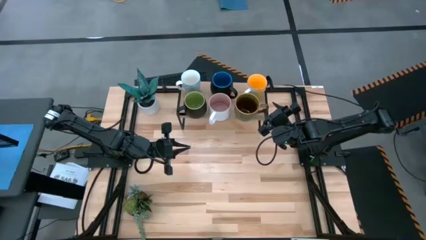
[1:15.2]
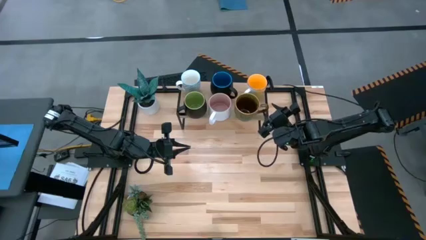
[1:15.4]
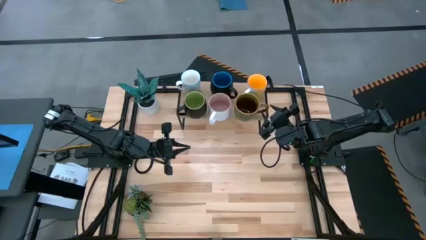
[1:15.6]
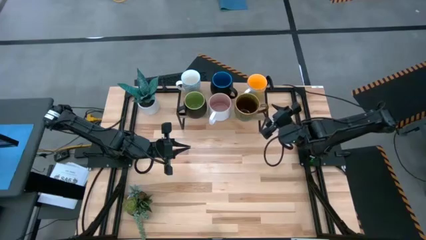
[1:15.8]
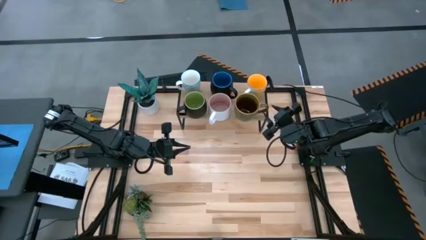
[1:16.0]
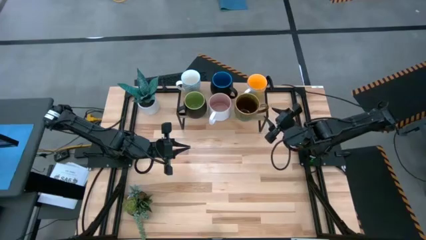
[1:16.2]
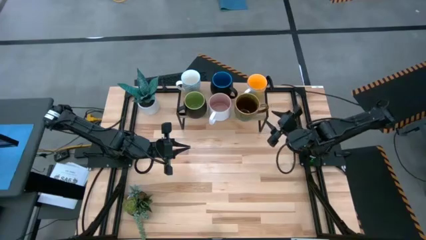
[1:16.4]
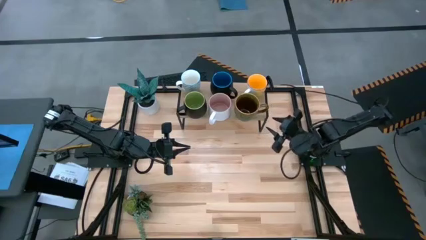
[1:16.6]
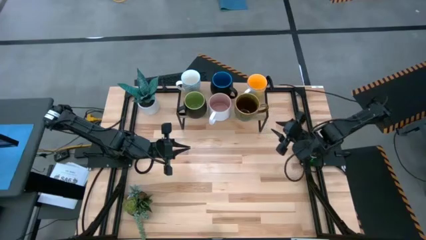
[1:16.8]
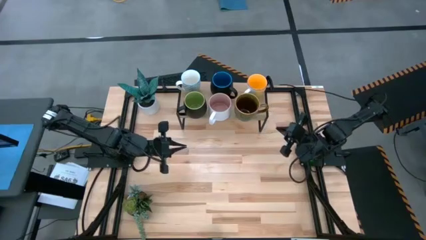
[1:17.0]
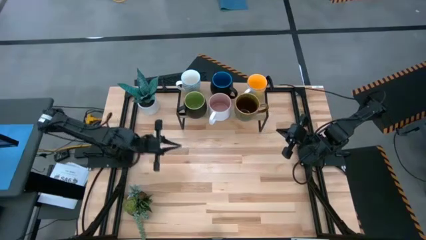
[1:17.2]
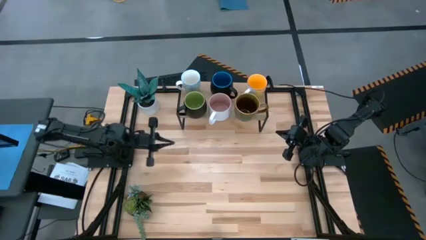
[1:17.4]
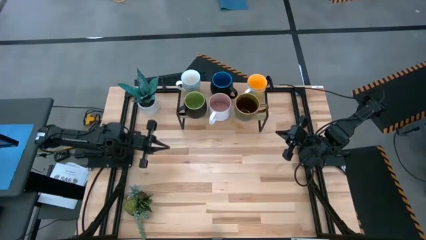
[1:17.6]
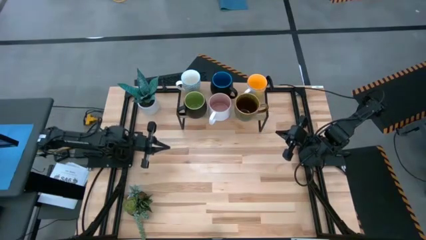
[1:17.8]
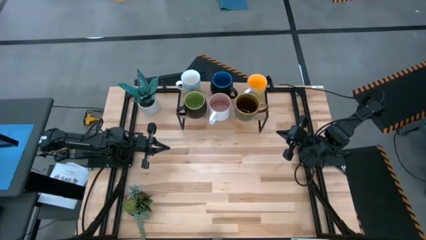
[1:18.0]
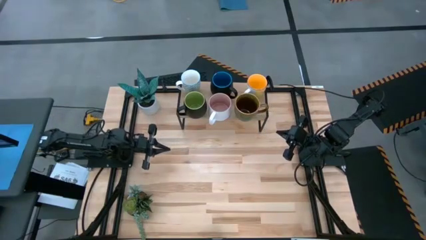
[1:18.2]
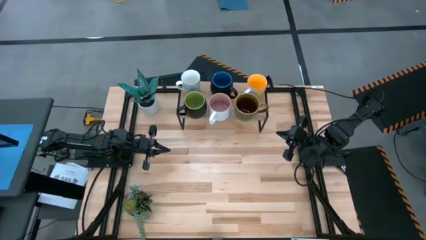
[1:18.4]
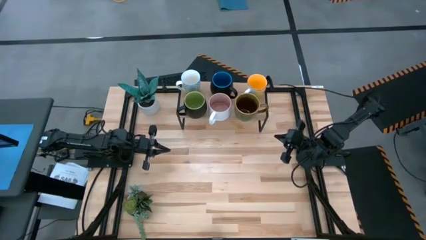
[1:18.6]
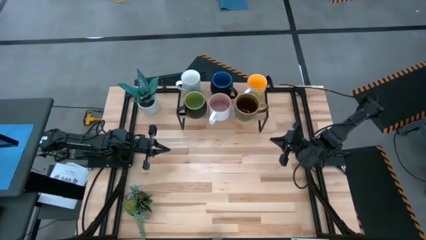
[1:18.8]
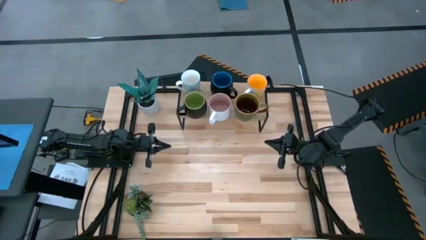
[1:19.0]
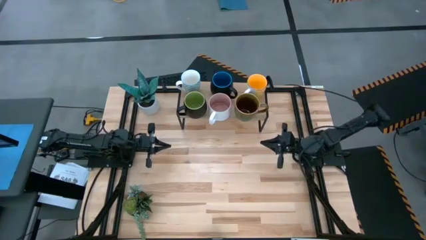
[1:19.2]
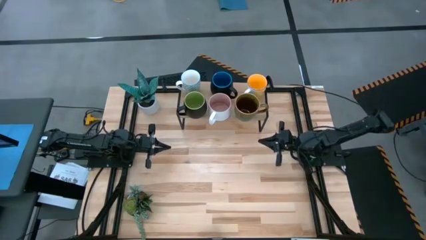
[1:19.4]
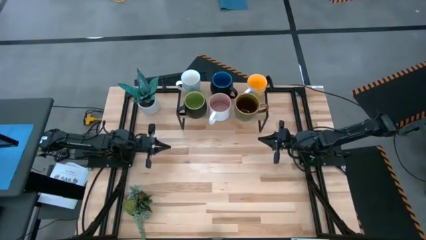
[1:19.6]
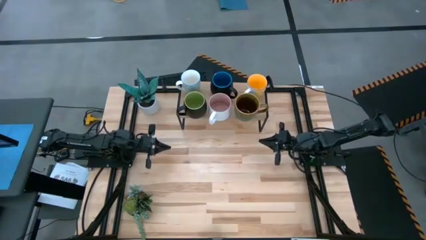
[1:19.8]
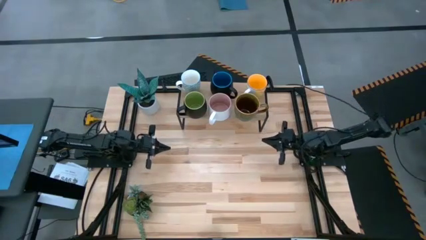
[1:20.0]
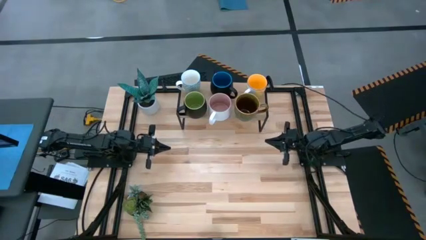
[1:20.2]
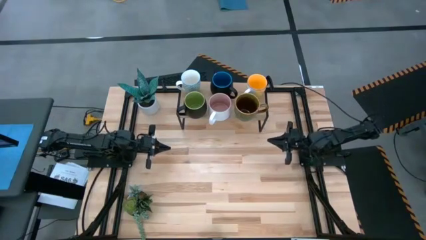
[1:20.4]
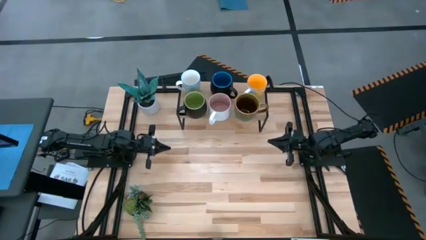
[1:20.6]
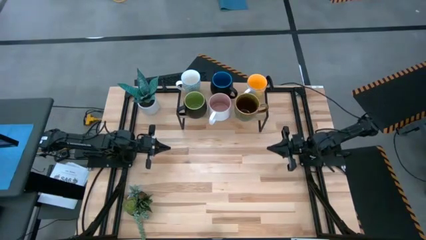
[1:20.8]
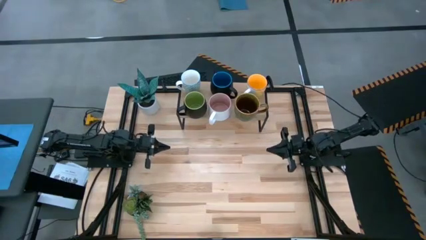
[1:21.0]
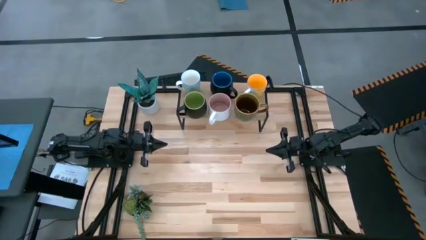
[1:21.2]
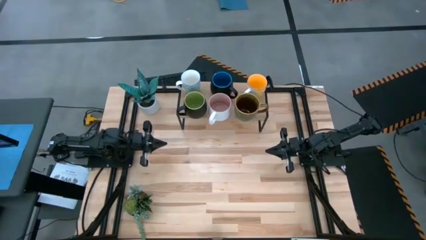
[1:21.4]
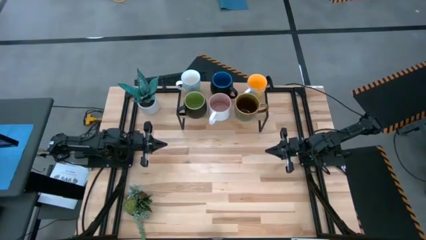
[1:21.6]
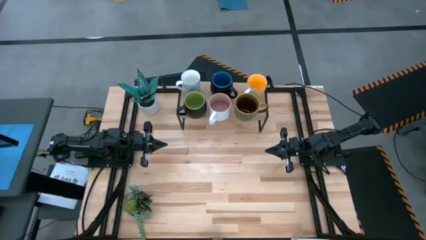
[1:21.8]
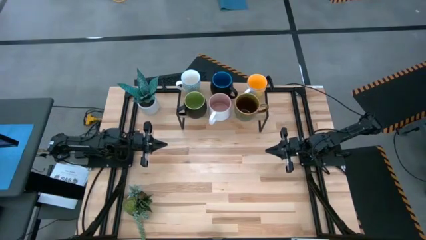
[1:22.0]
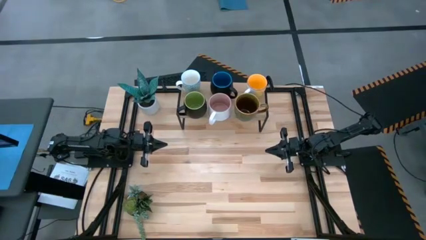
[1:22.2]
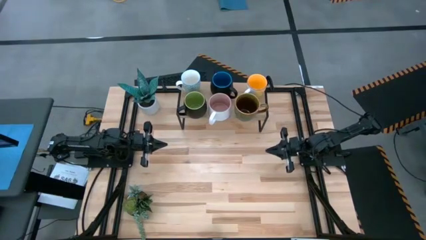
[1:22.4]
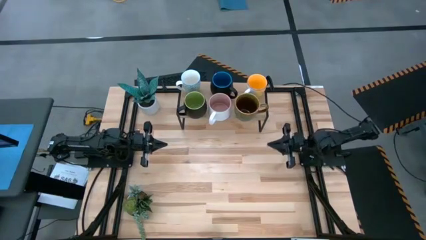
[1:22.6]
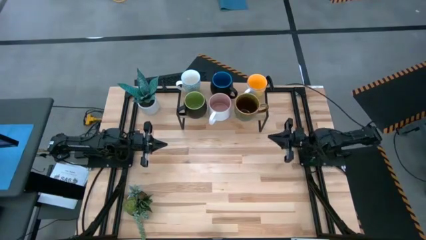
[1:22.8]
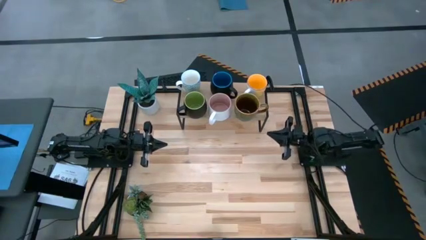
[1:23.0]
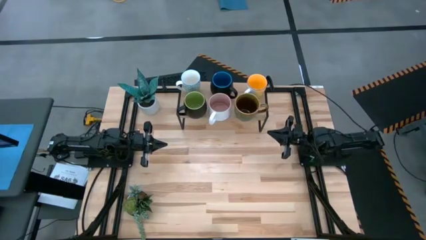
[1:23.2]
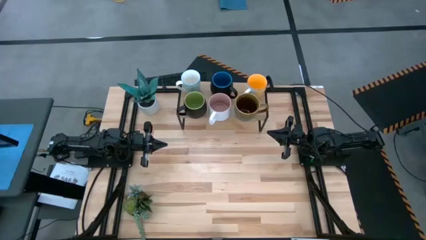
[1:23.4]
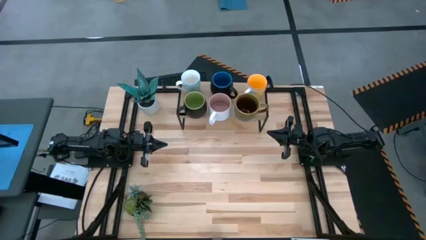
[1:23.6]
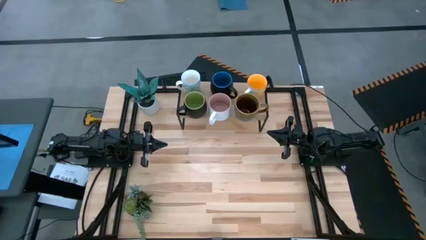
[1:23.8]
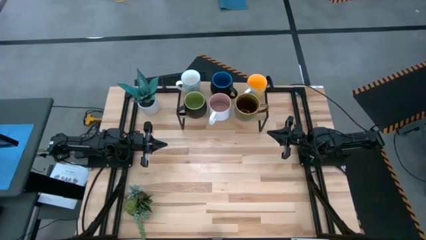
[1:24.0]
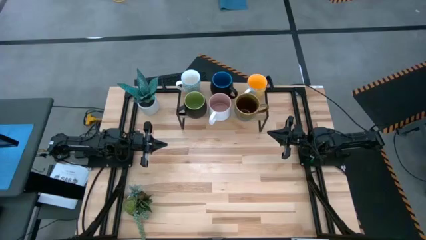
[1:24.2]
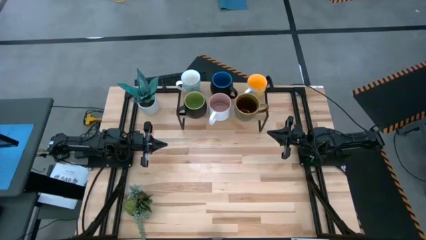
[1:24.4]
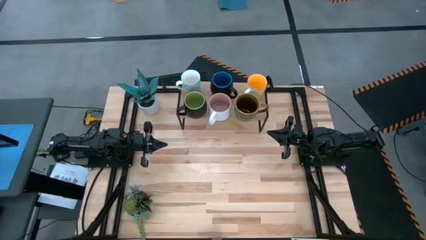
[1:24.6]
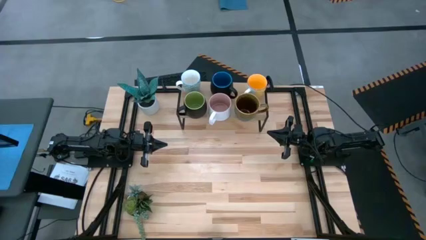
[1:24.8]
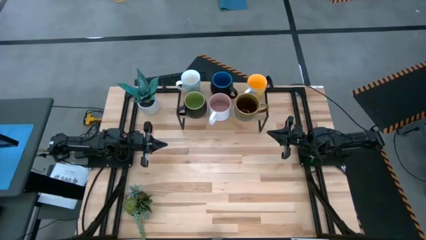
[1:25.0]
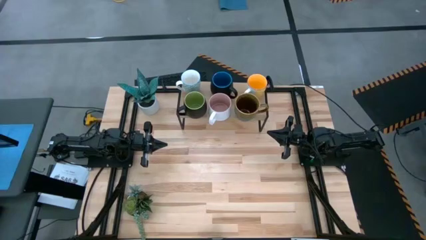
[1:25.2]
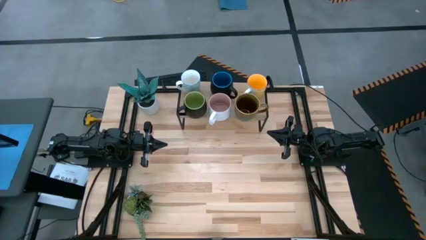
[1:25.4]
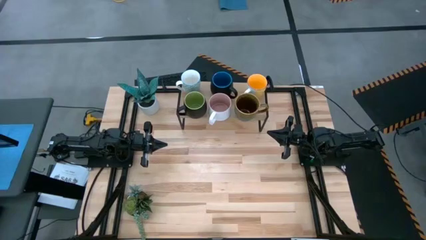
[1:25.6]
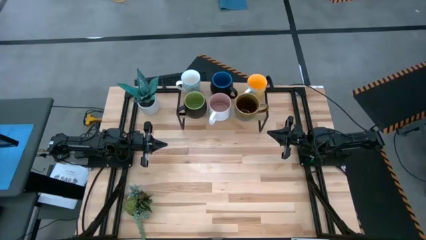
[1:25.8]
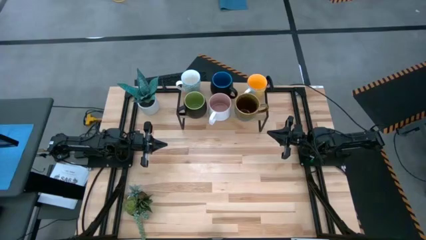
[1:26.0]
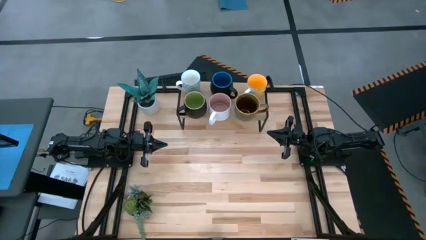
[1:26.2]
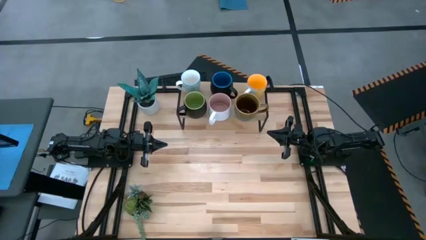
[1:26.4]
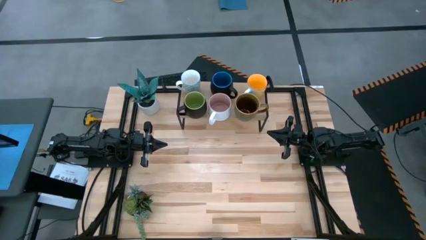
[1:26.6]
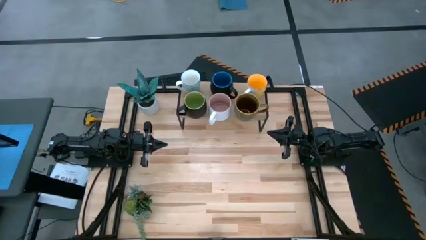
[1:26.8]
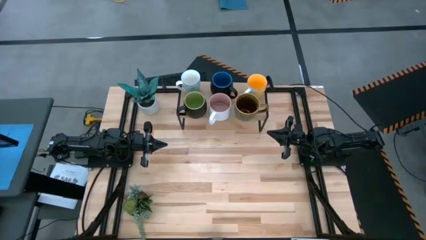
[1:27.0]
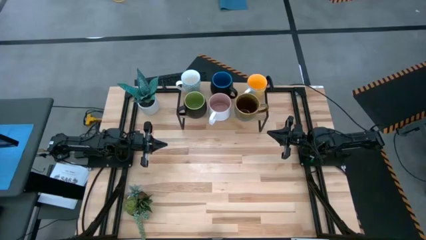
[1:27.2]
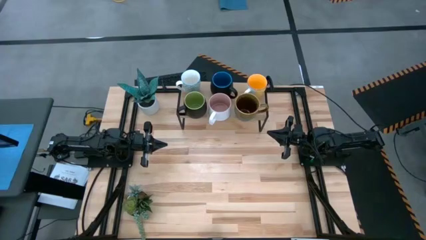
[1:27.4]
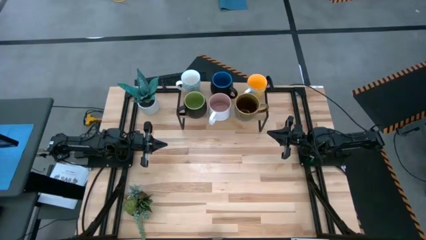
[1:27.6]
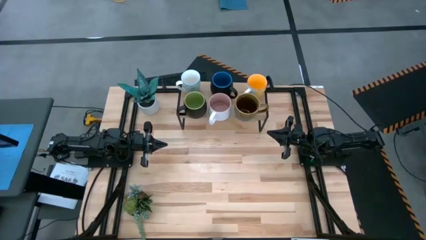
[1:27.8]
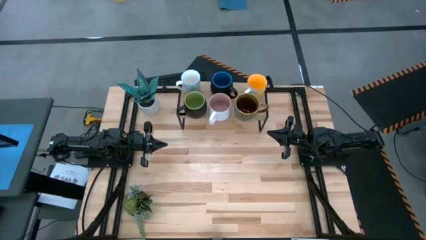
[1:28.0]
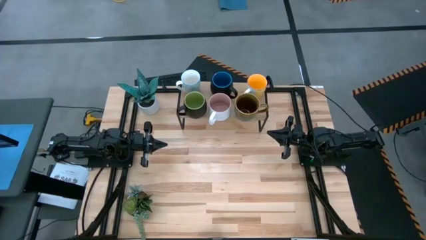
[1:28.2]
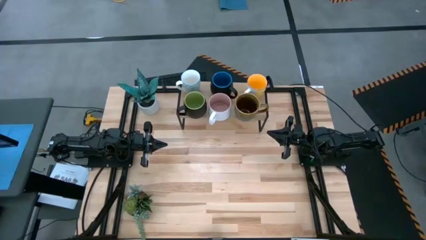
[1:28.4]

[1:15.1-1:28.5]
Task: Place coffee mugs
Return to Home Position
